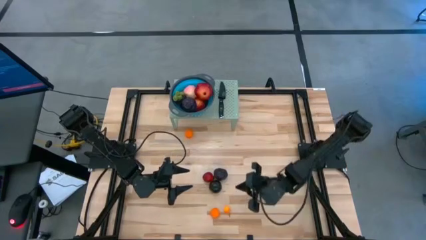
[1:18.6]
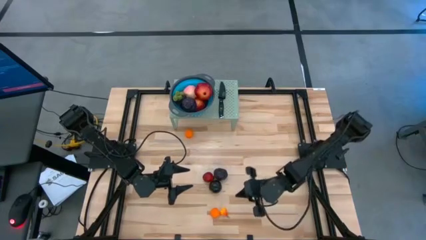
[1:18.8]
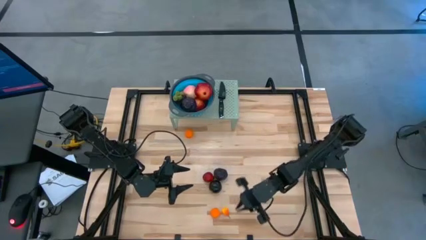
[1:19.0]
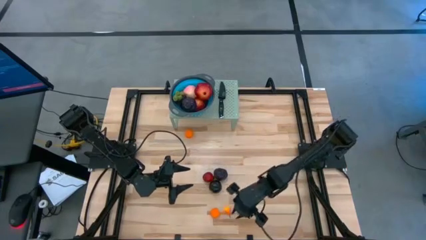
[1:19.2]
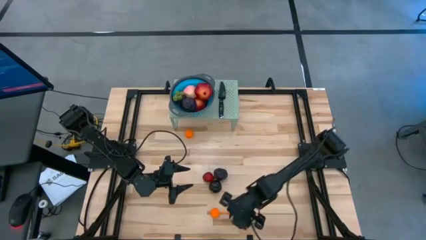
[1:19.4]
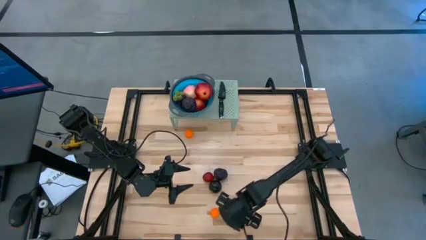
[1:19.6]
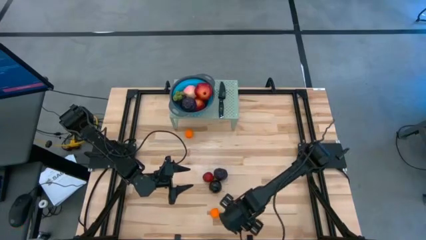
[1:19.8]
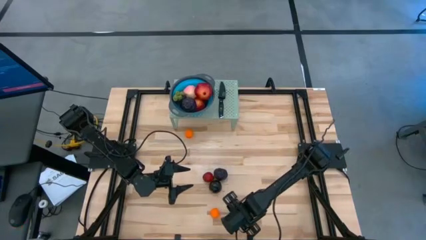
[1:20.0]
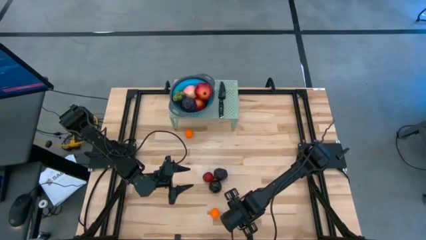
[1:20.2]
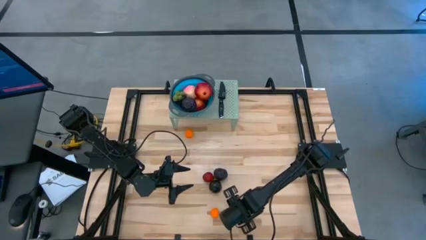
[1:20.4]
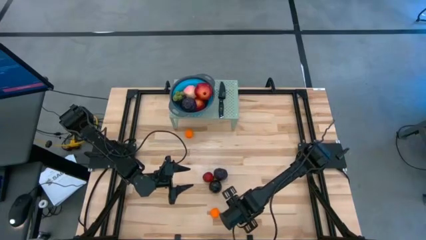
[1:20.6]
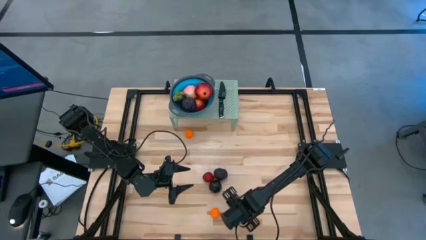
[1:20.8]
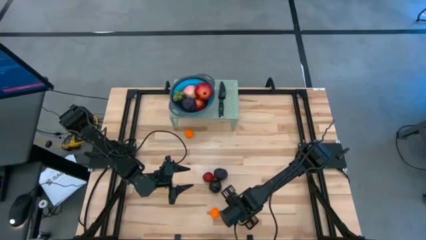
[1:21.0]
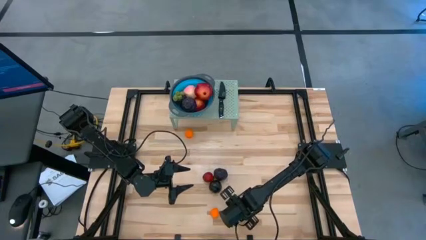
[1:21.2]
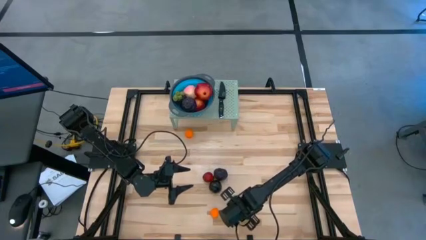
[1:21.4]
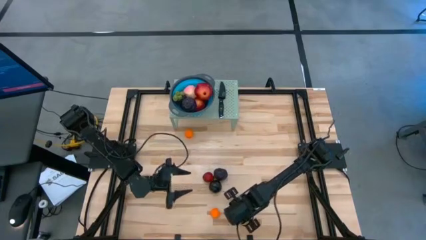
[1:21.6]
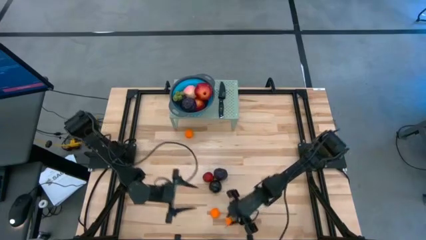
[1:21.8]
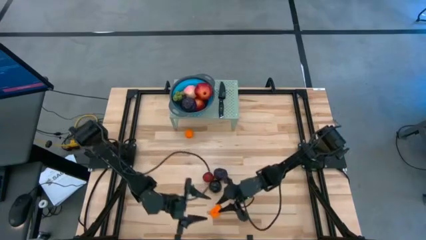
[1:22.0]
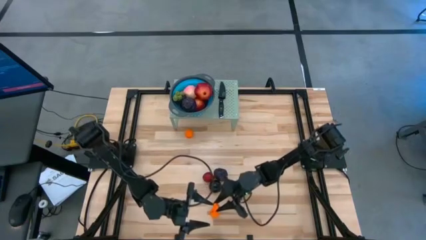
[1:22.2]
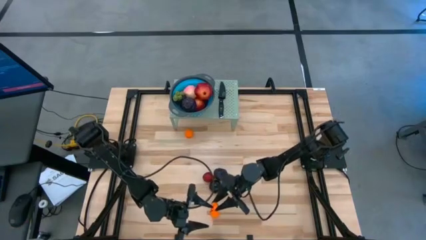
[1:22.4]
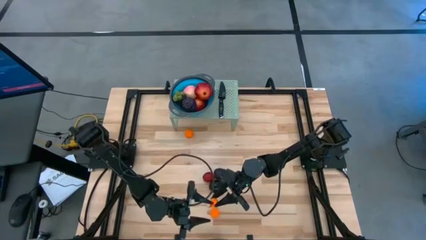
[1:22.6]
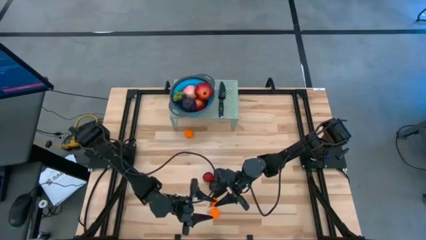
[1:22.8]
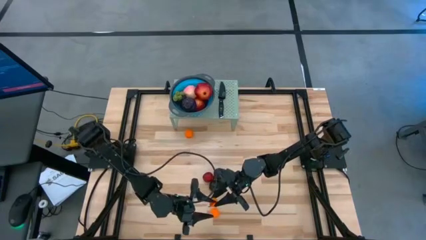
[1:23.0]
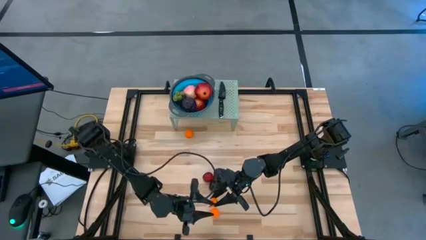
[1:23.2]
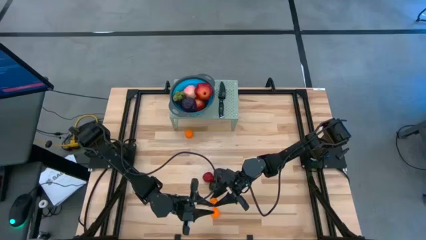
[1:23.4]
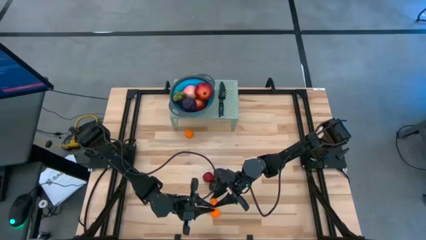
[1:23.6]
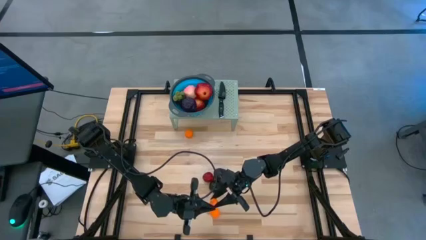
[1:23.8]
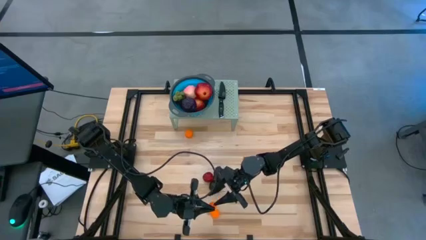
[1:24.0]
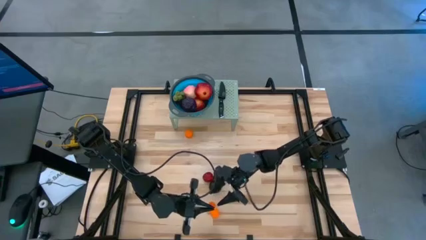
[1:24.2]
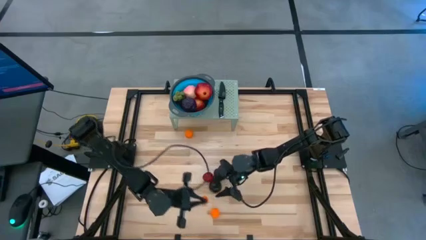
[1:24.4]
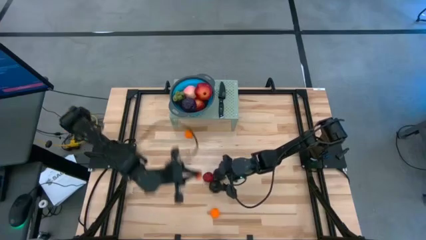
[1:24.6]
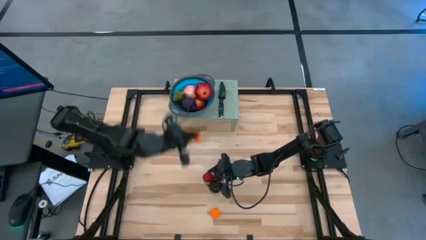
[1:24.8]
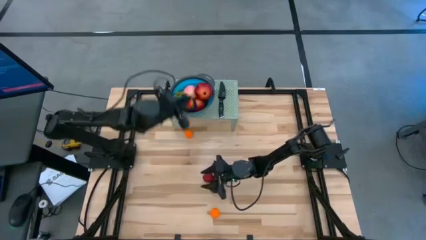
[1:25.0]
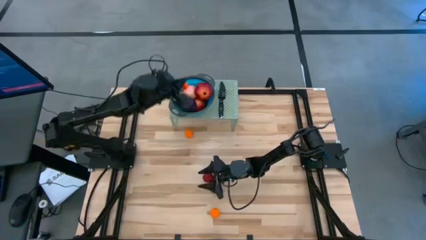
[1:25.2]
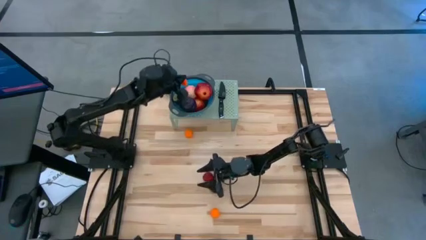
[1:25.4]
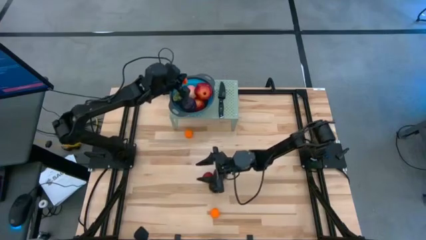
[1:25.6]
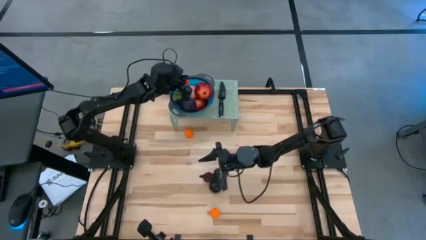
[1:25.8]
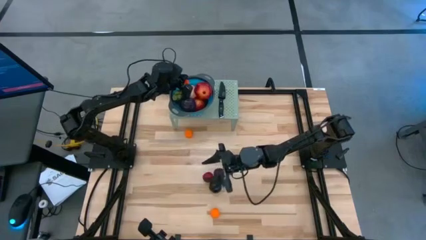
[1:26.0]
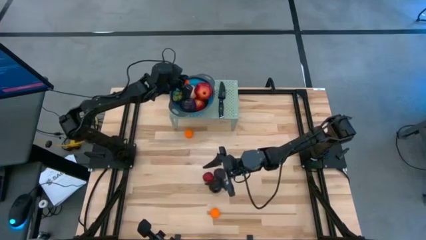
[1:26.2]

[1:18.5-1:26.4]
Task: Pick & Place Fruit
Put the orange pear into the blue strainer bowl

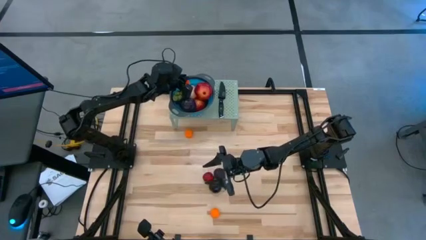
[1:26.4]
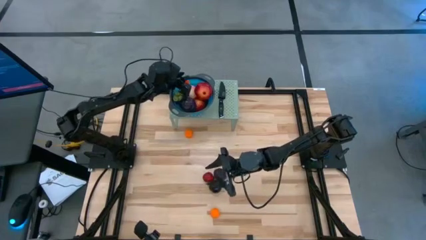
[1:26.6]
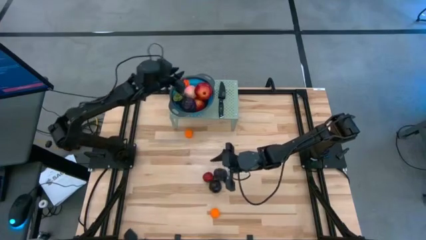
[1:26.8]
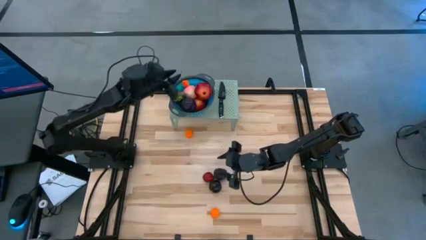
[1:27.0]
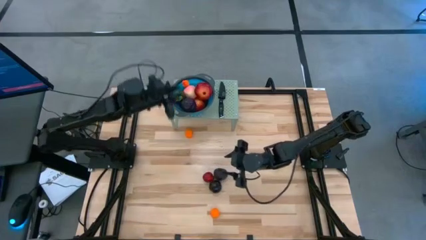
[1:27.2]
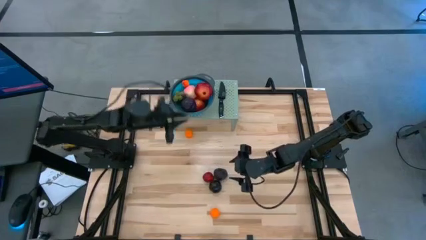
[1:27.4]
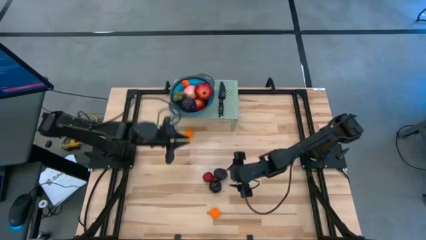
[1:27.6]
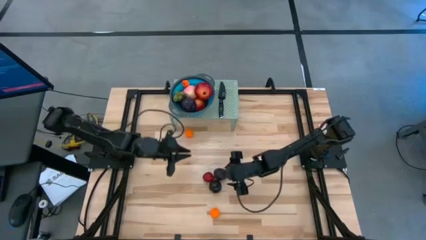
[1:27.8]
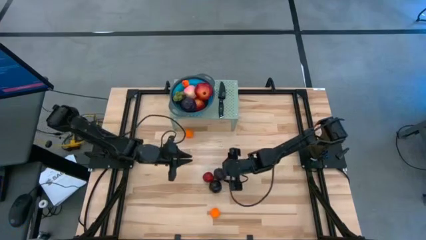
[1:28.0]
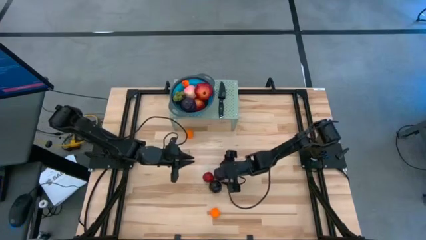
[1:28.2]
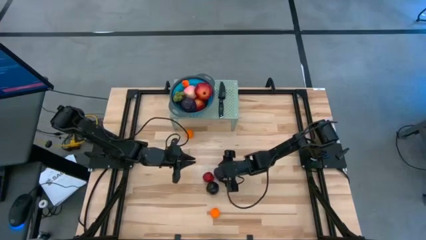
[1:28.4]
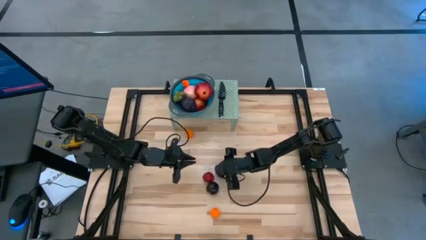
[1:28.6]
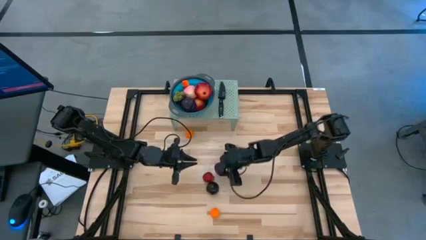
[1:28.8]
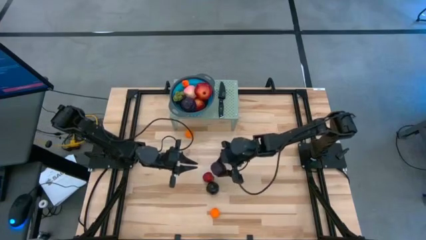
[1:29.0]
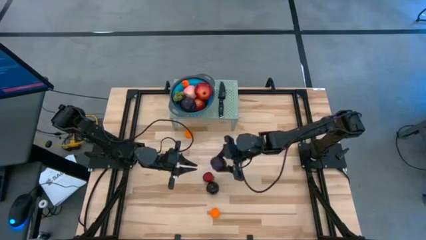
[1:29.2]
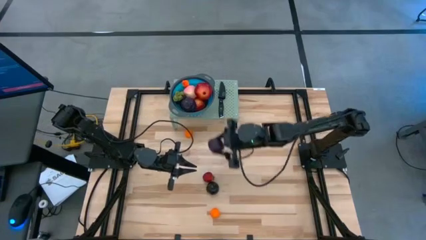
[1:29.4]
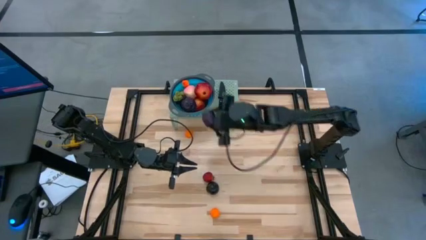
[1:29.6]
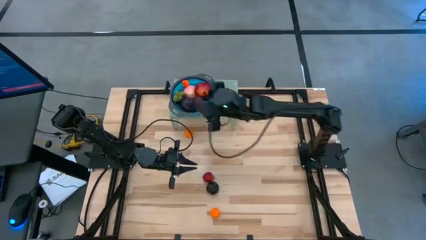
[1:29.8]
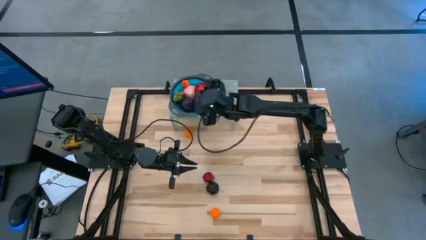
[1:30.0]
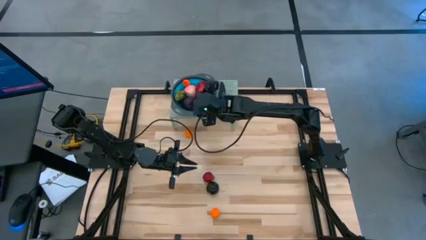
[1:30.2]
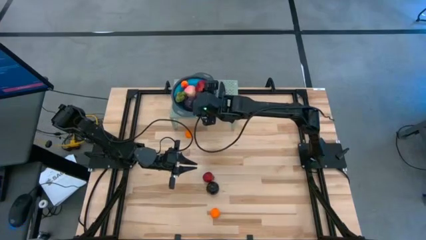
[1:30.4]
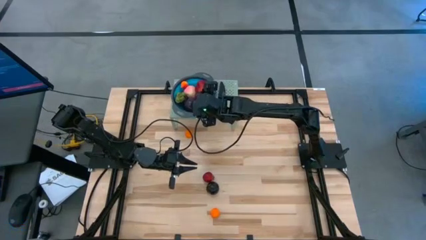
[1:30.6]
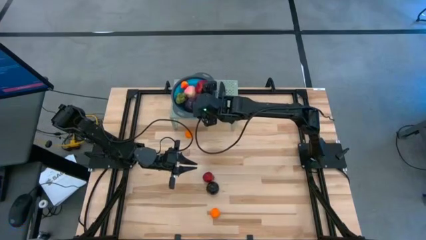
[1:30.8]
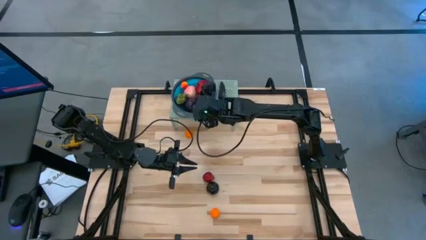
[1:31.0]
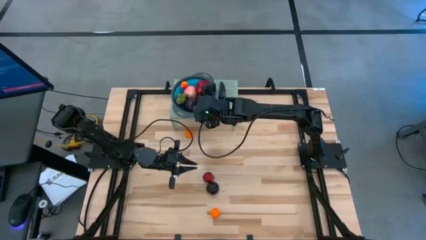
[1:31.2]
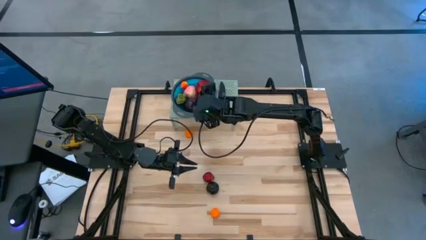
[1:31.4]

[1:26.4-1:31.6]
Put the purple plum into the blue strainer bowl

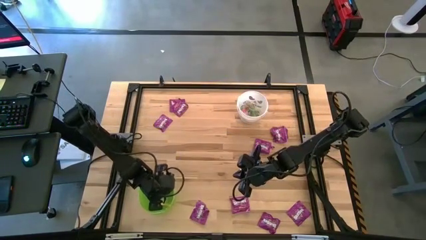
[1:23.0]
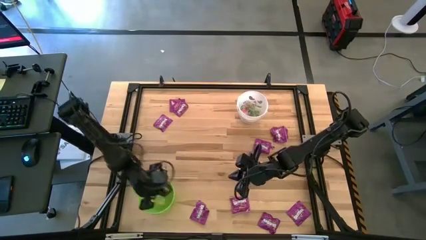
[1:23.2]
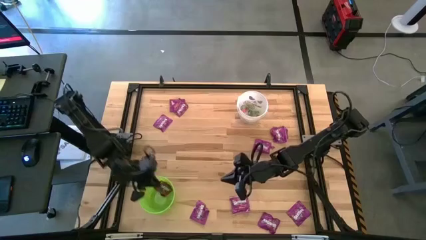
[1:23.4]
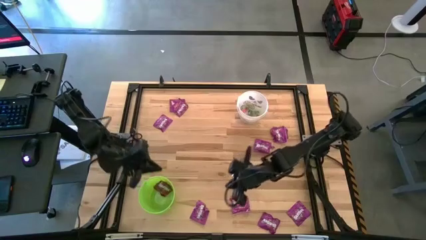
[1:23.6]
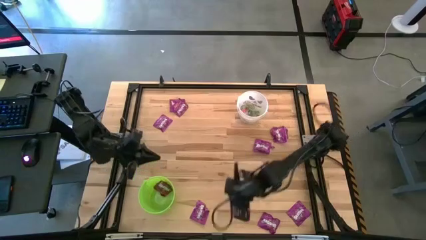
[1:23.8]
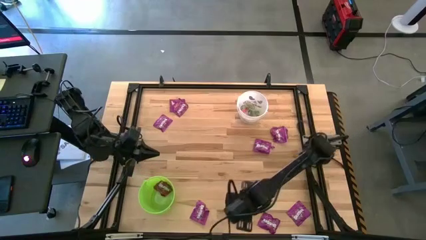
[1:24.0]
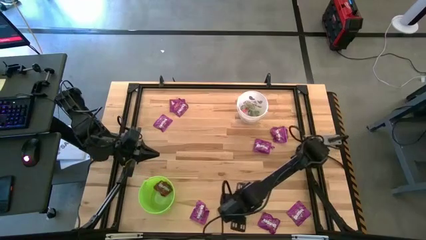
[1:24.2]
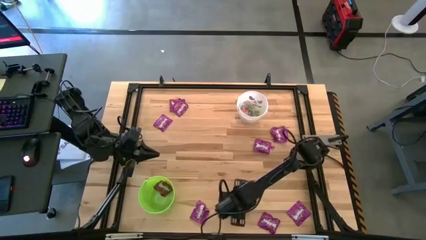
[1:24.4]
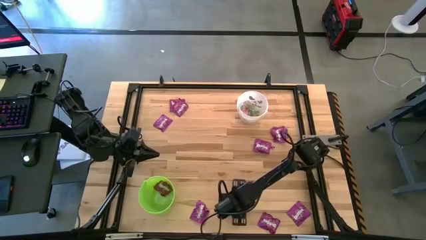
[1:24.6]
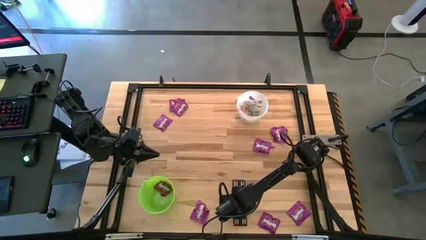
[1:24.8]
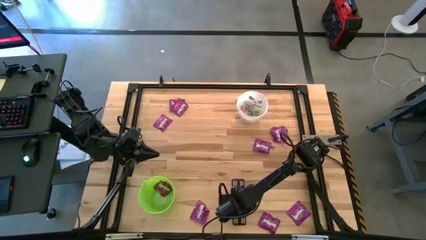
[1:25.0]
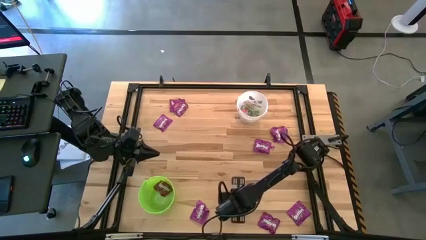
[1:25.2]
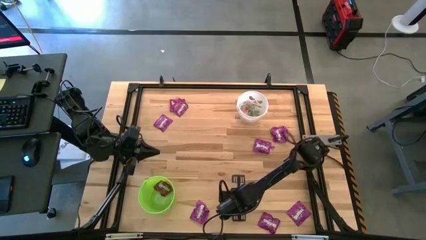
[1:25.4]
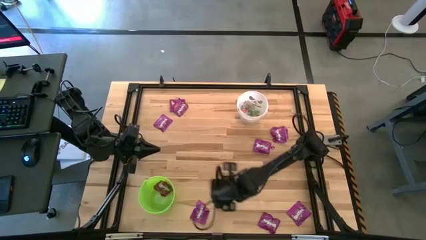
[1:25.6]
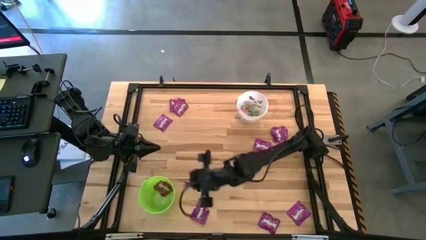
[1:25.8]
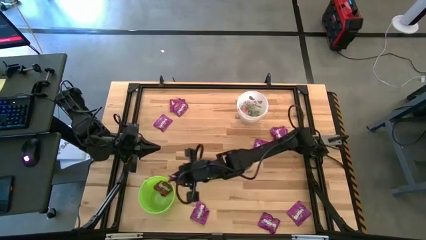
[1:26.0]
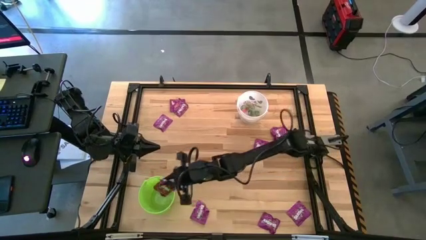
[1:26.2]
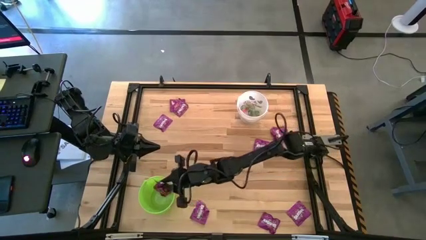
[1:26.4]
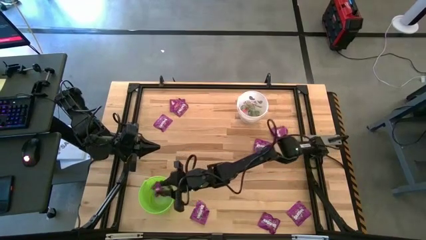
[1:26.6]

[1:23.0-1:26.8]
Task: Sort candy by brand, put in halloween buckets
Put the purple candy into the green bucket
